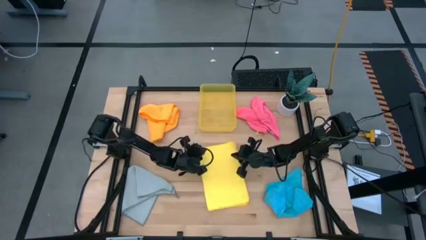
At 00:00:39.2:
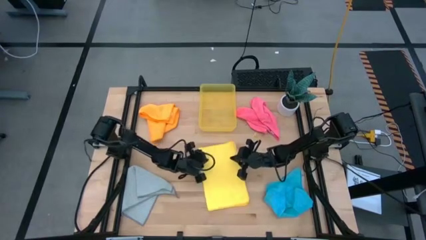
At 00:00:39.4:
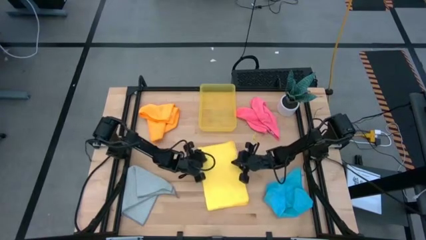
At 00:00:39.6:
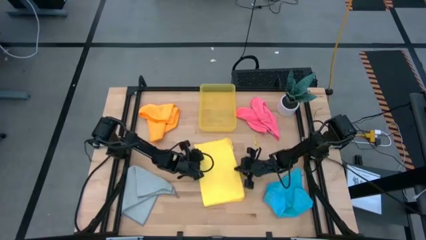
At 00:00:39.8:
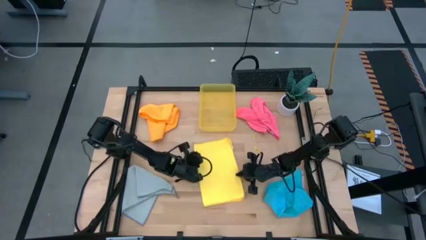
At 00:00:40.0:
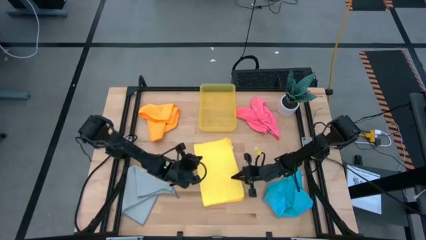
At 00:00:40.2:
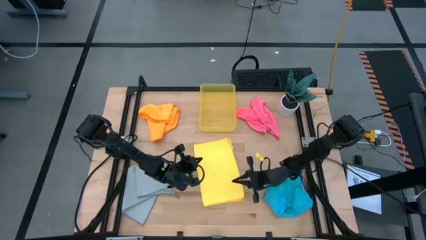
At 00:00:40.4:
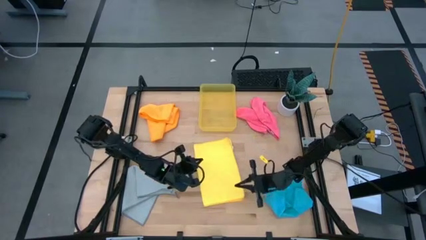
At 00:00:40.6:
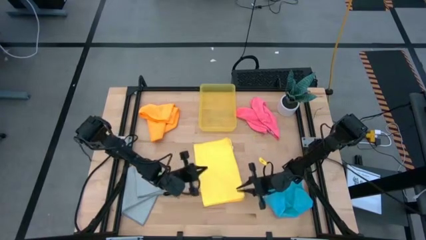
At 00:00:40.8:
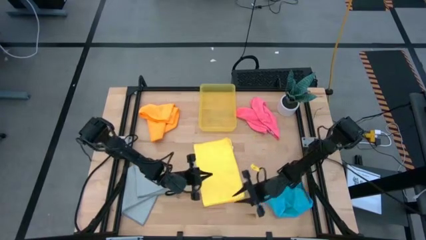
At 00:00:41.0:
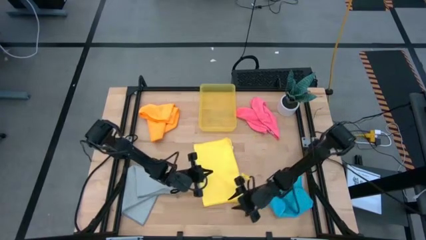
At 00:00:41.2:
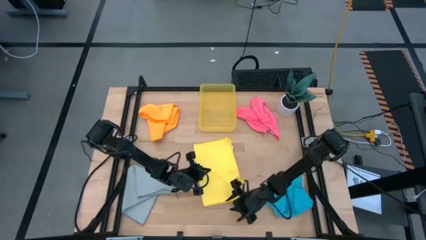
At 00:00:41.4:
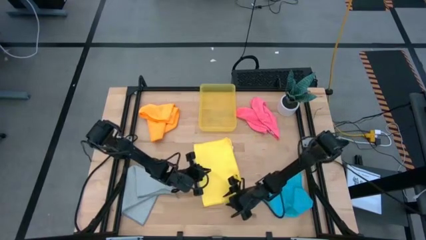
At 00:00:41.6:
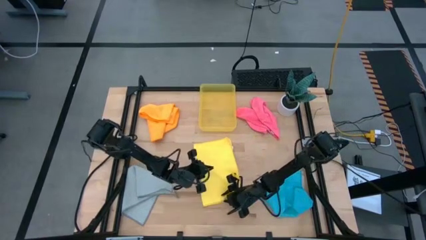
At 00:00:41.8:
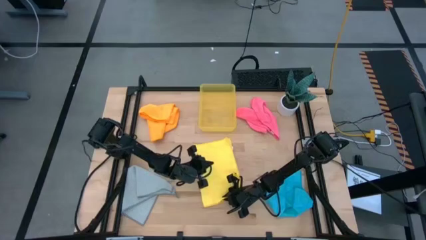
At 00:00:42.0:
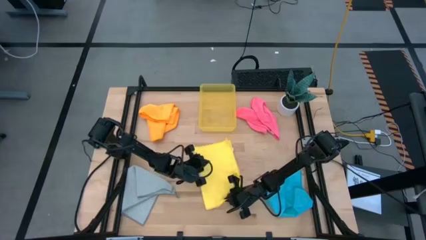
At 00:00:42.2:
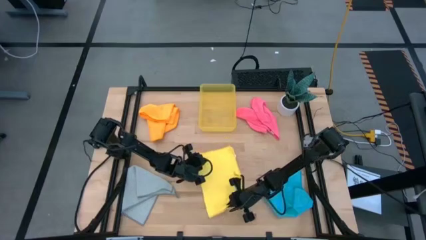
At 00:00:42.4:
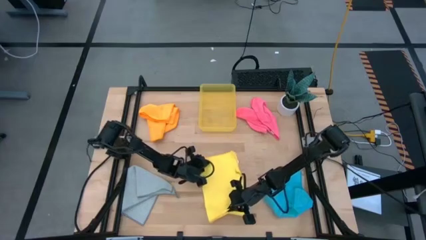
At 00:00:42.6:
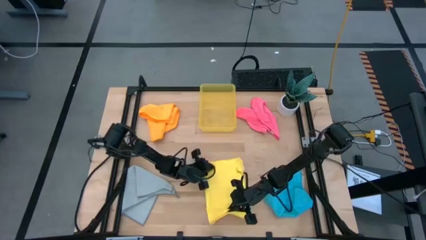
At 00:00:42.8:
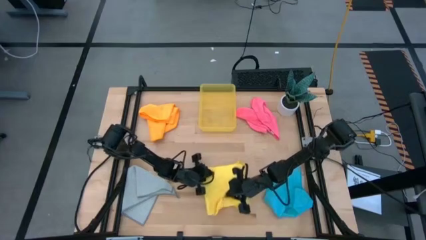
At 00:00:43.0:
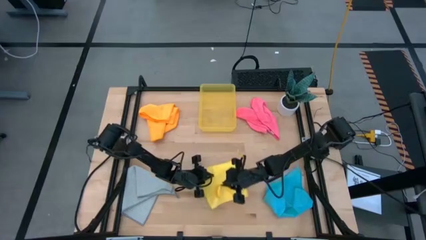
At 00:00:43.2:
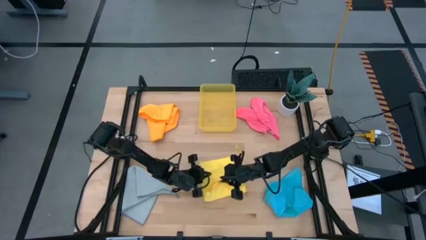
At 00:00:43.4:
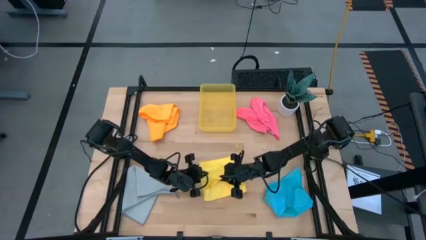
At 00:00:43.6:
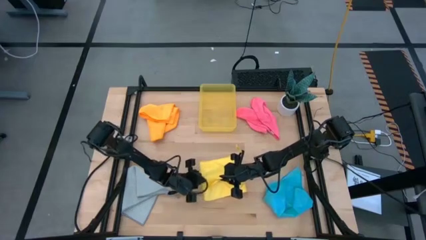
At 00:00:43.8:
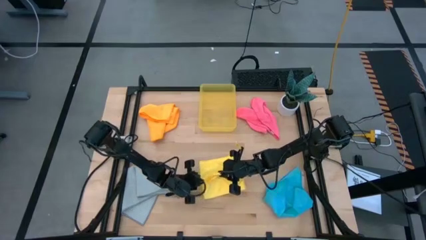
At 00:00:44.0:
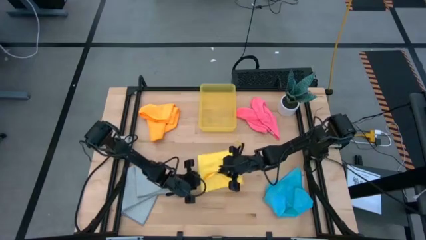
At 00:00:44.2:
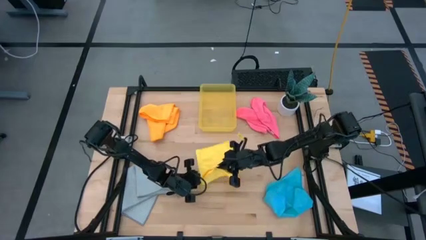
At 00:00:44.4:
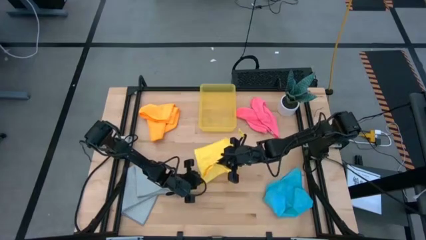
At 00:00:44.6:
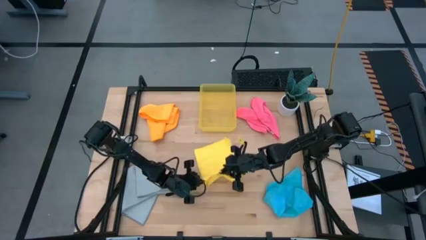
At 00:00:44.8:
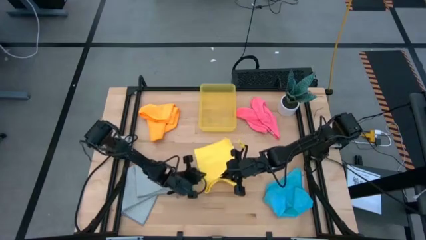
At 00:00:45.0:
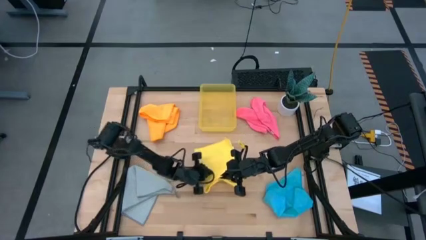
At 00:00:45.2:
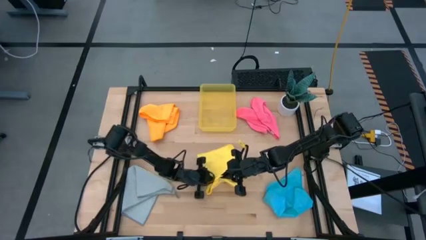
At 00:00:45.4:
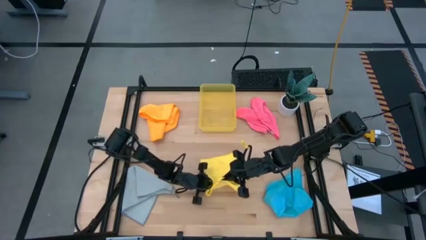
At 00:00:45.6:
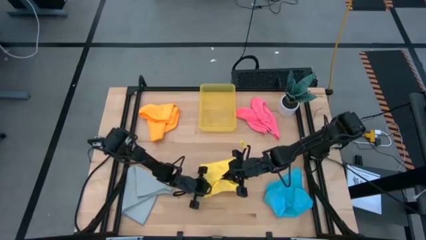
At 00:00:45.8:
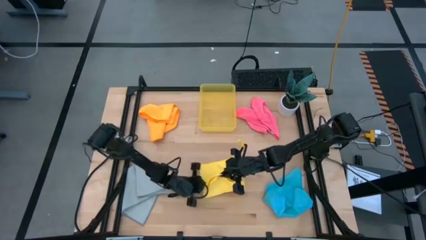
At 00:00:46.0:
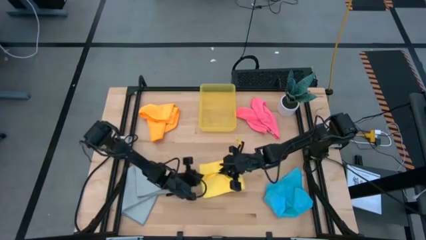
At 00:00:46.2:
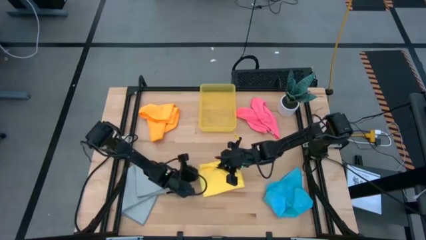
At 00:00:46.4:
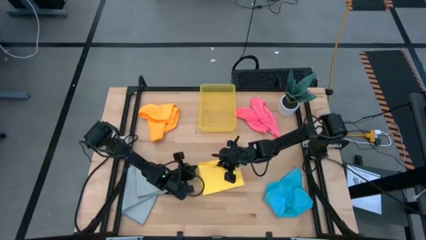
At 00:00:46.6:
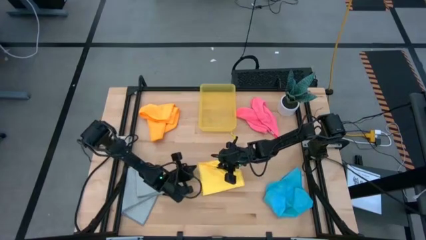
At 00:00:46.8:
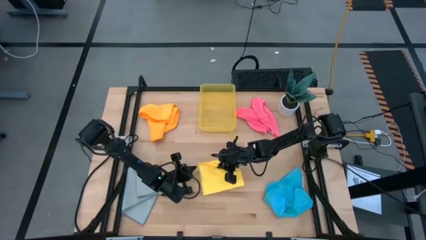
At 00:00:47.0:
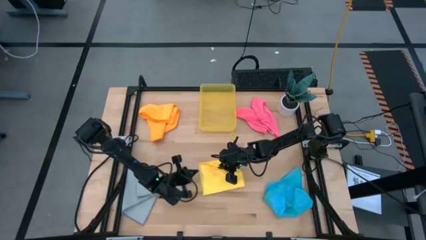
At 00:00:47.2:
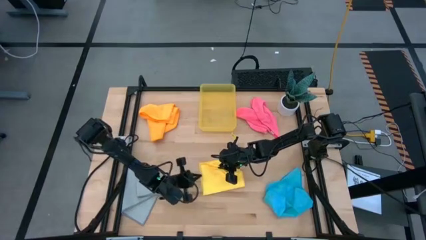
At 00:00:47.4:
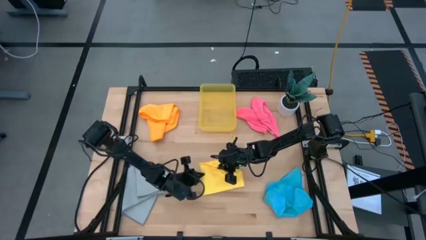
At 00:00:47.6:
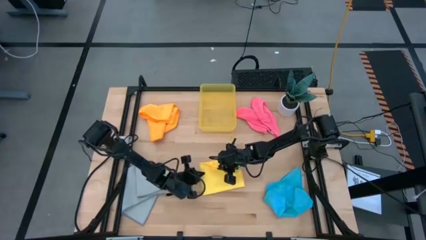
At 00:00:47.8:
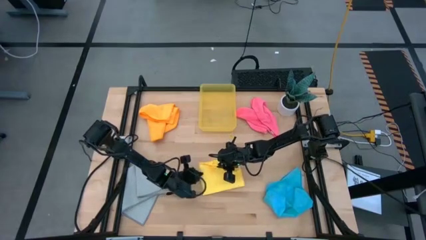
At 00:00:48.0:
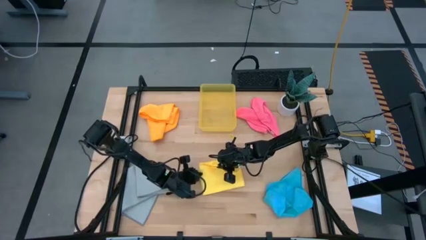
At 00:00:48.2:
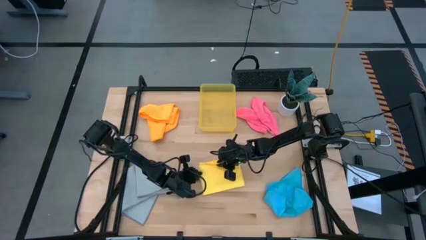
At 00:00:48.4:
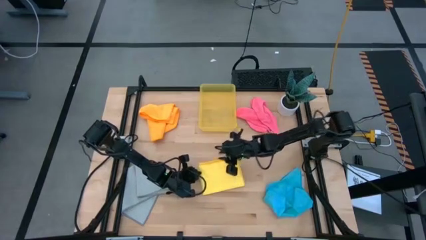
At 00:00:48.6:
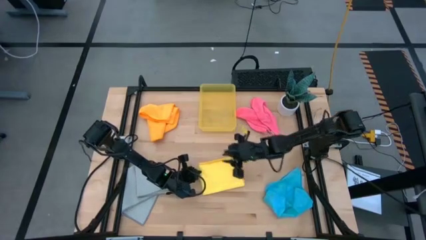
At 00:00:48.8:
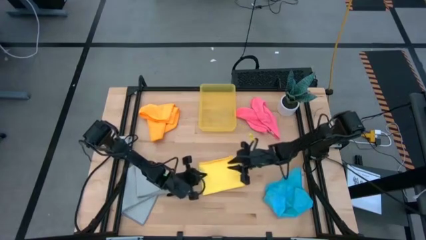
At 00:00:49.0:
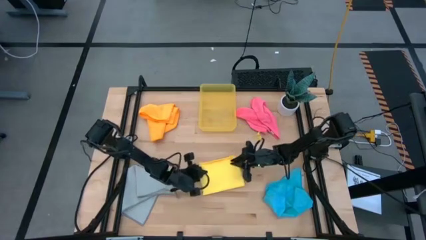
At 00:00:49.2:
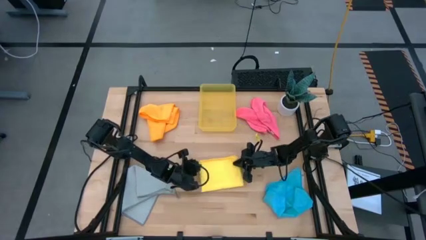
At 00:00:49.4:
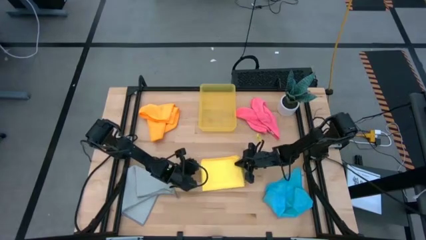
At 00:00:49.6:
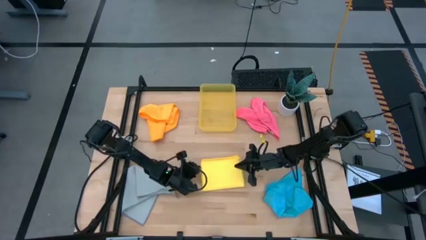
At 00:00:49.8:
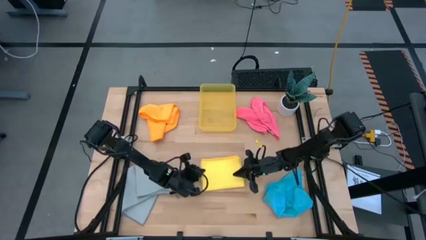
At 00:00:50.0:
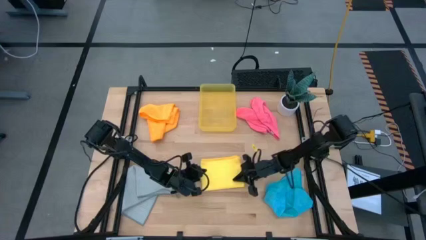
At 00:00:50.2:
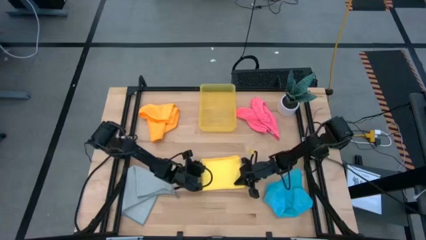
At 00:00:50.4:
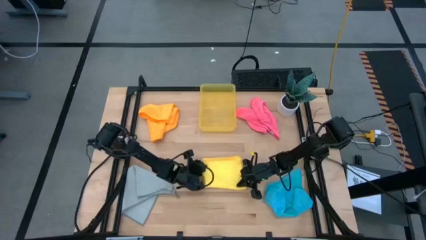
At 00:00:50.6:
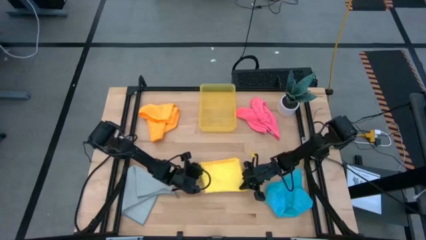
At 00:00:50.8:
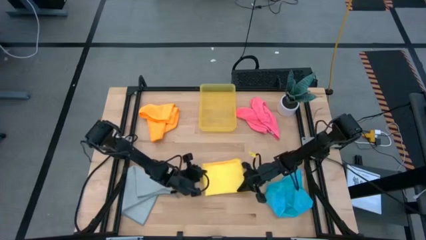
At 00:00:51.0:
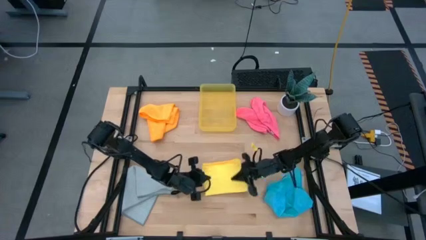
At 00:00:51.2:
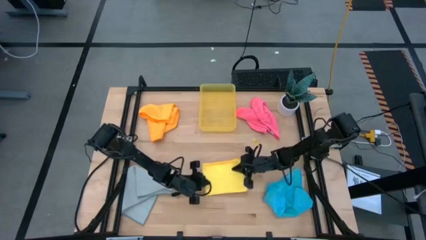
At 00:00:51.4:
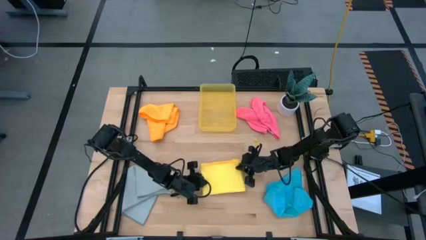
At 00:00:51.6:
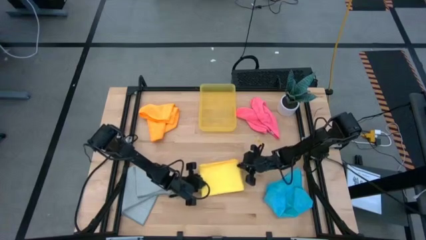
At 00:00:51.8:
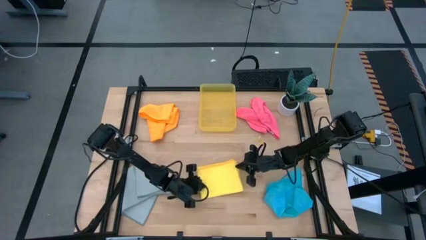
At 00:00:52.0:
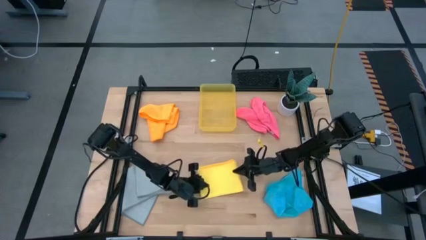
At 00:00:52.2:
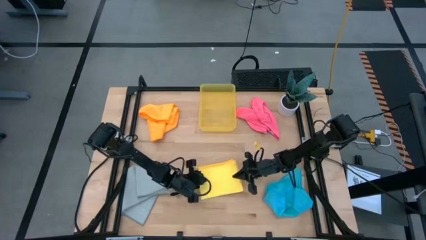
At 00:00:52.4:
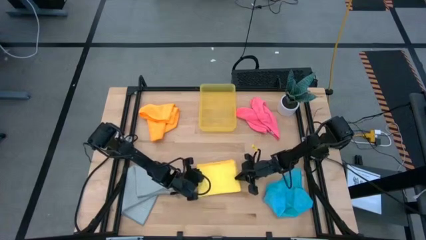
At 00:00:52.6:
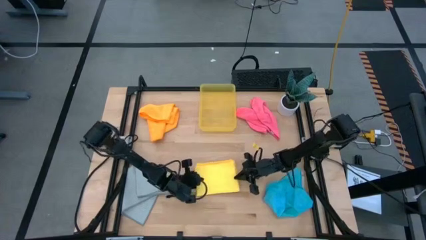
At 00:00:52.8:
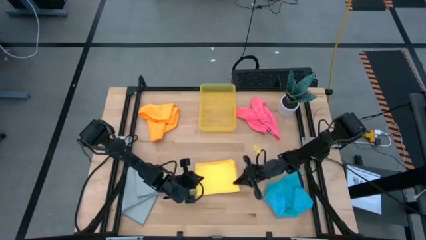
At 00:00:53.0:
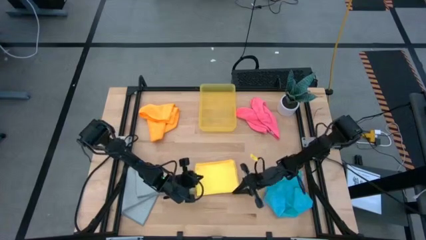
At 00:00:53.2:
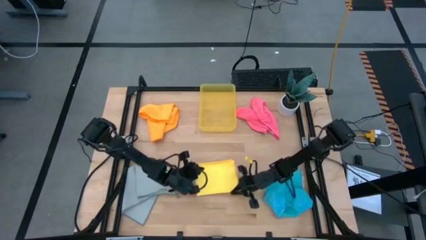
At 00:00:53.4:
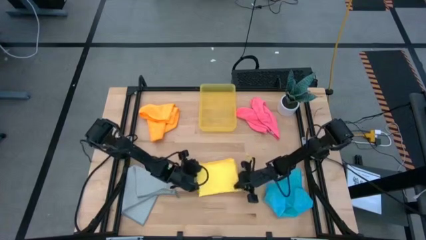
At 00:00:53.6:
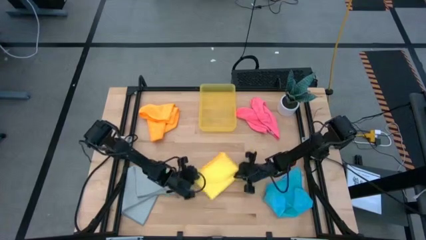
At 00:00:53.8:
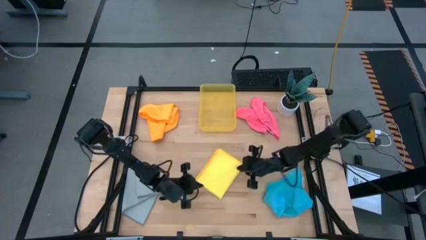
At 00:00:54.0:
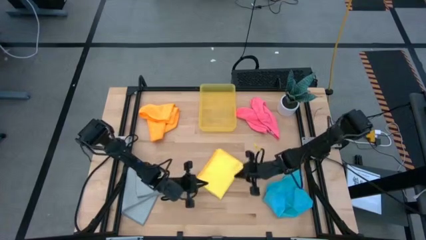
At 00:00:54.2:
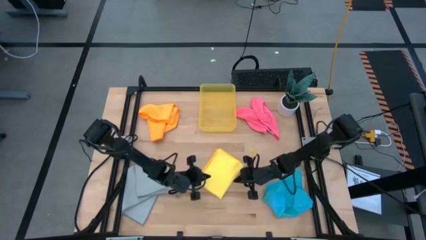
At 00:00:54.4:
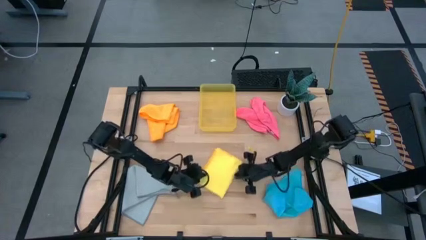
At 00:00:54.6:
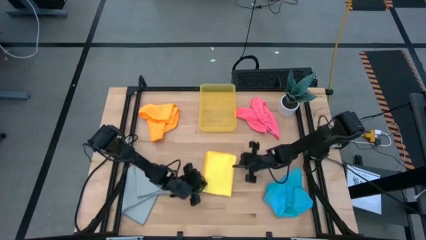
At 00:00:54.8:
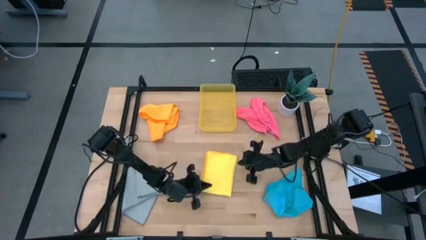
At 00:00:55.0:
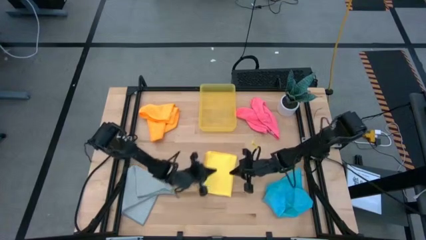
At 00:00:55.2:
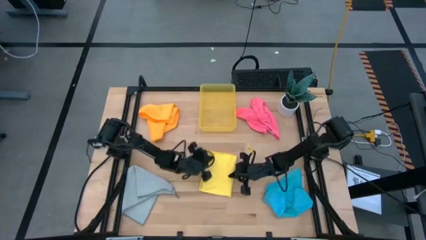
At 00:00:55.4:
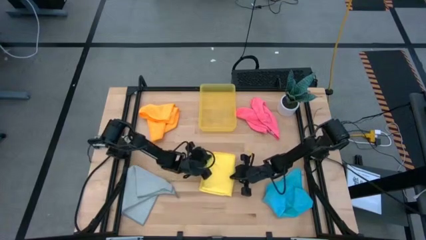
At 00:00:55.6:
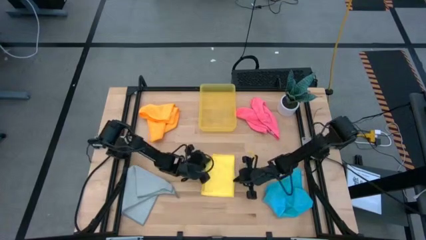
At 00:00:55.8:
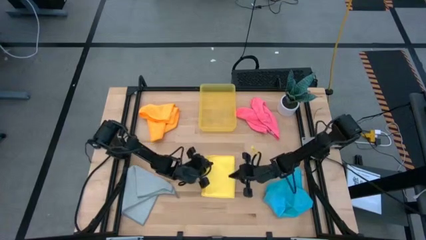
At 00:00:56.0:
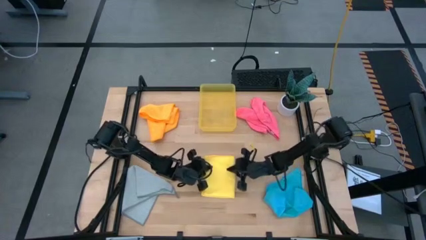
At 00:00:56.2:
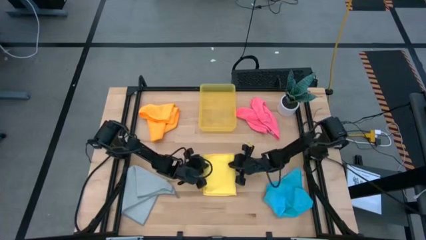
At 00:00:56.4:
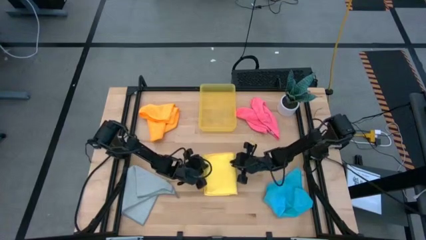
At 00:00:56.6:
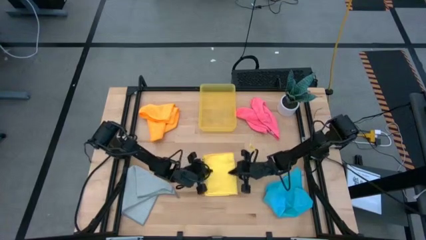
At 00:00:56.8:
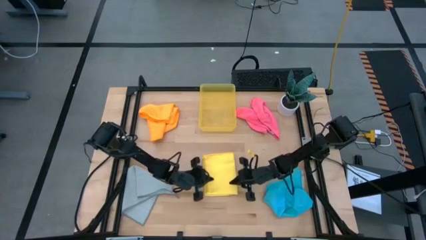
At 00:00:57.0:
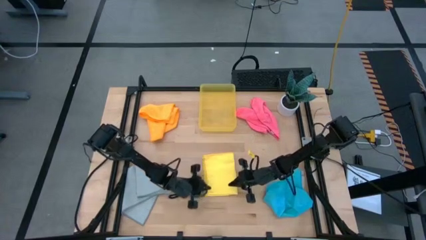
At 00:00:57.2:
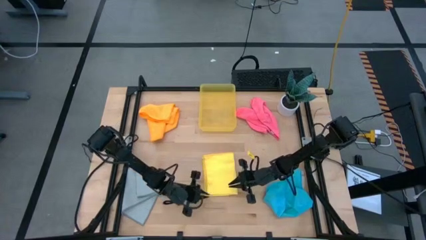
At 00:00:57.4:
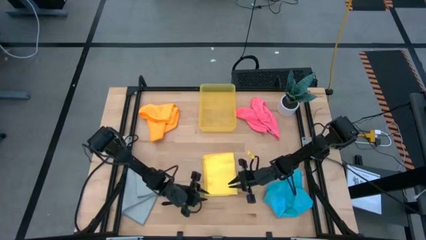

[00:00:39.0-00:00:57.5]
Task: Fold microfiber towels
Fold the yellow microfiber towel
